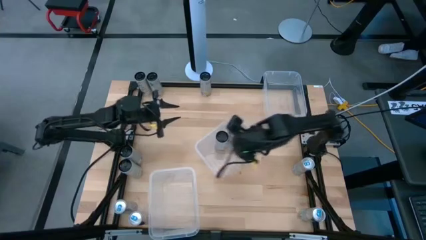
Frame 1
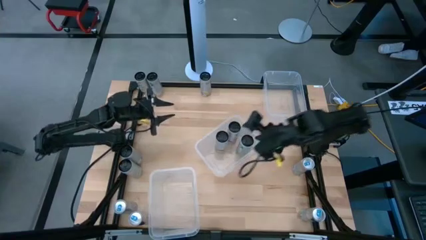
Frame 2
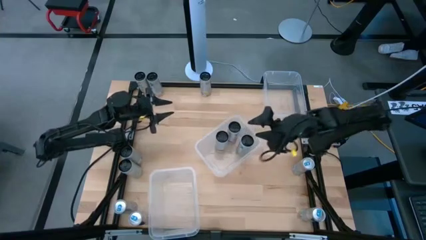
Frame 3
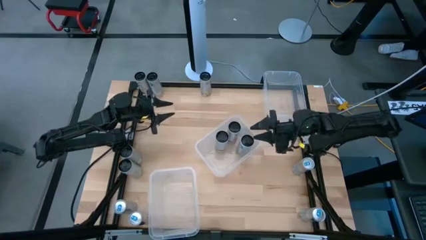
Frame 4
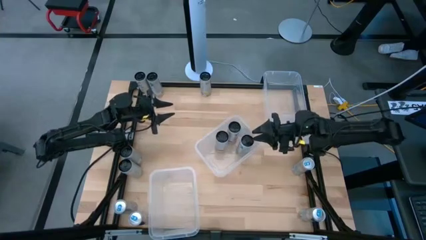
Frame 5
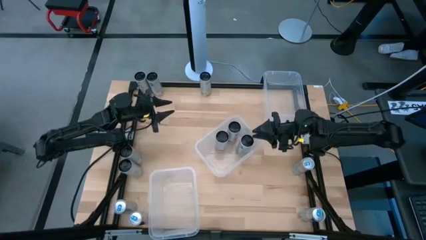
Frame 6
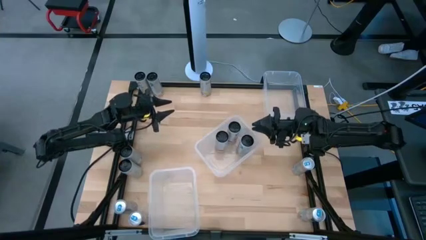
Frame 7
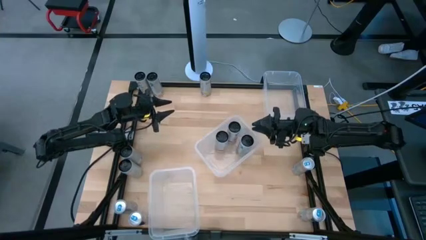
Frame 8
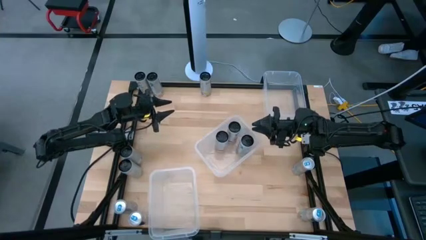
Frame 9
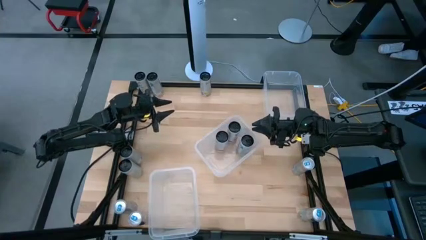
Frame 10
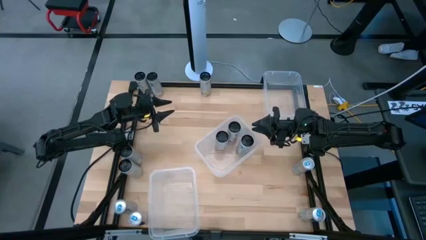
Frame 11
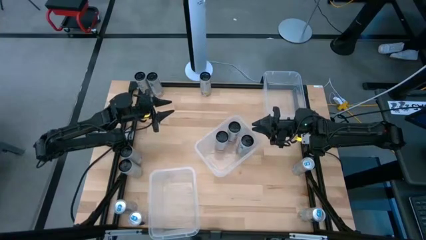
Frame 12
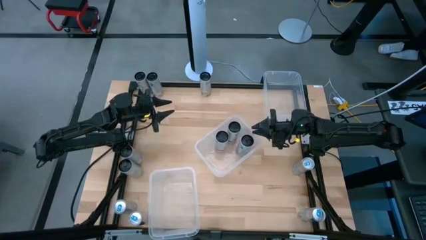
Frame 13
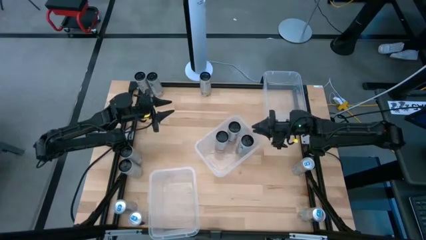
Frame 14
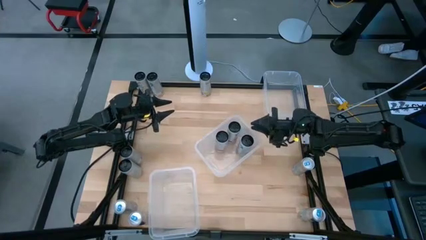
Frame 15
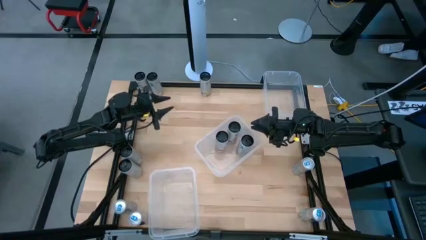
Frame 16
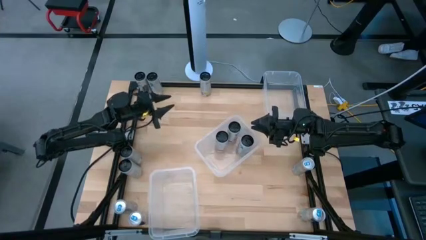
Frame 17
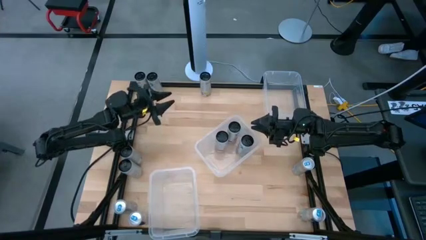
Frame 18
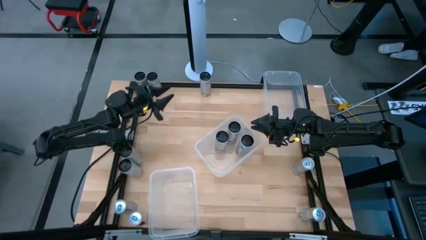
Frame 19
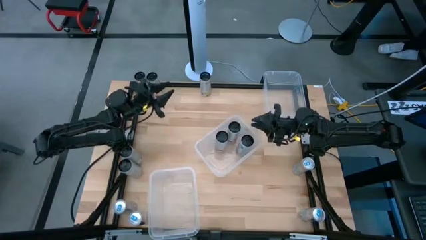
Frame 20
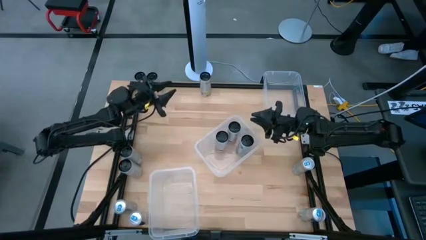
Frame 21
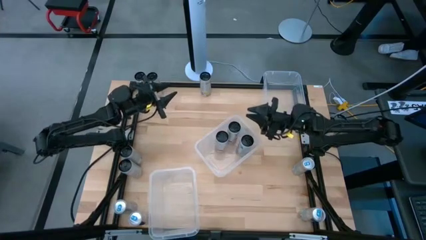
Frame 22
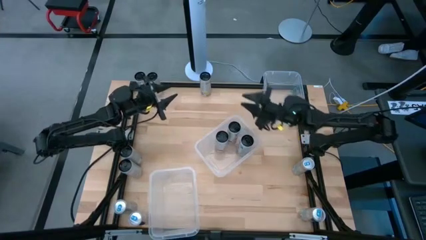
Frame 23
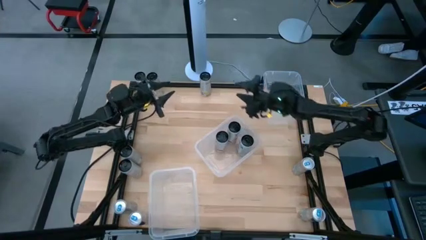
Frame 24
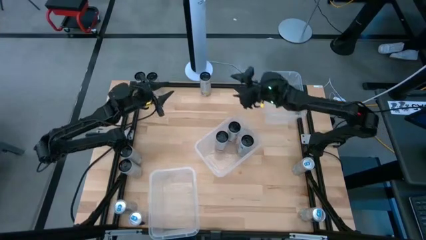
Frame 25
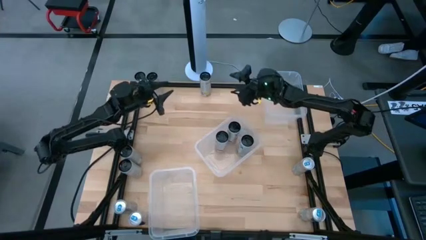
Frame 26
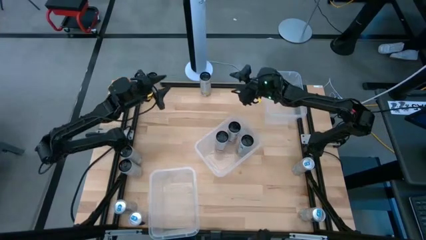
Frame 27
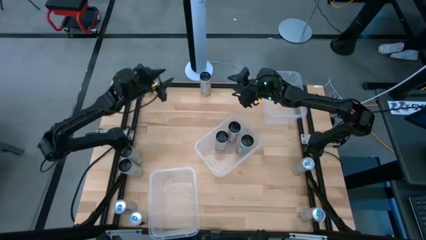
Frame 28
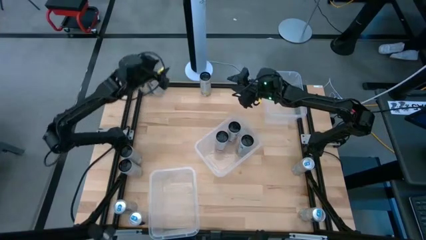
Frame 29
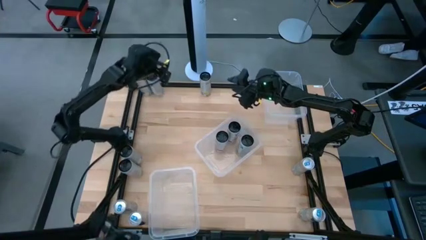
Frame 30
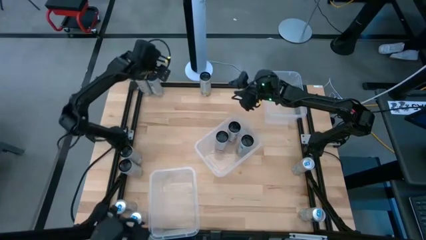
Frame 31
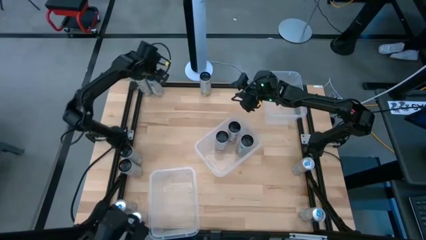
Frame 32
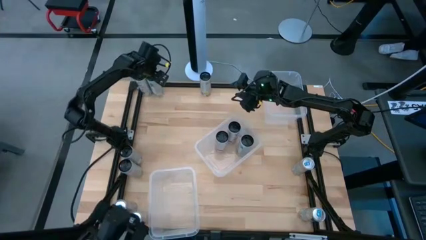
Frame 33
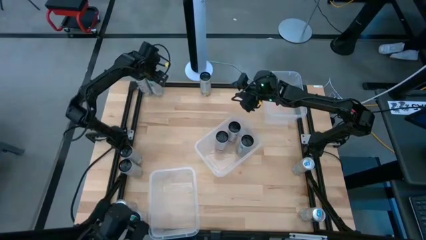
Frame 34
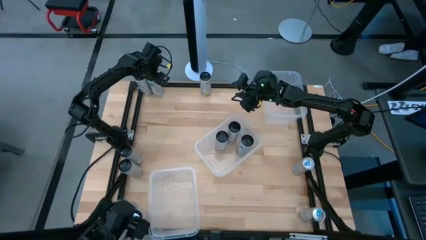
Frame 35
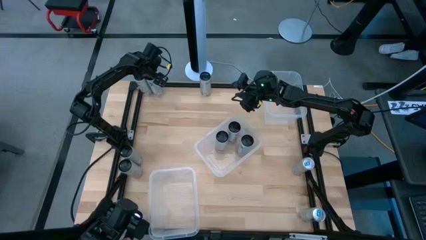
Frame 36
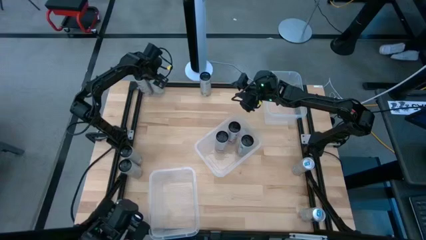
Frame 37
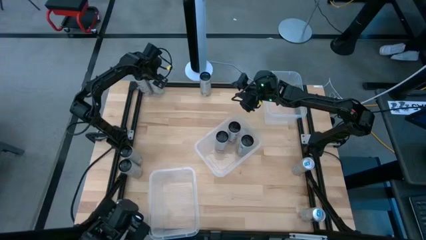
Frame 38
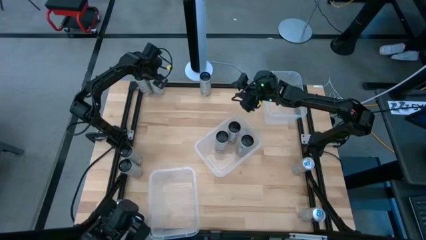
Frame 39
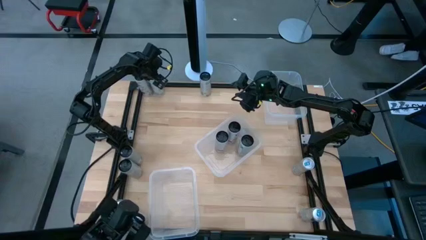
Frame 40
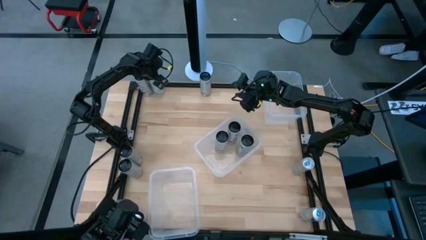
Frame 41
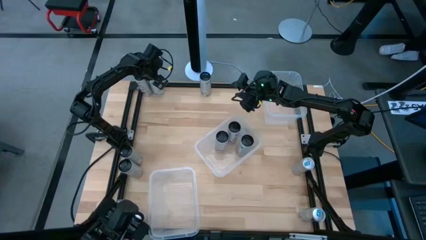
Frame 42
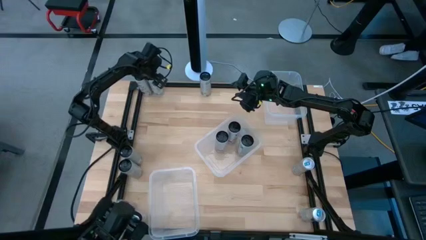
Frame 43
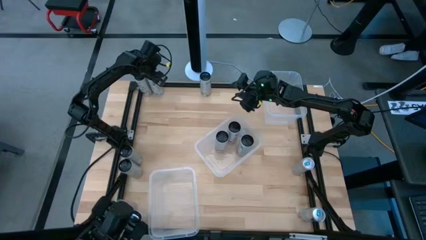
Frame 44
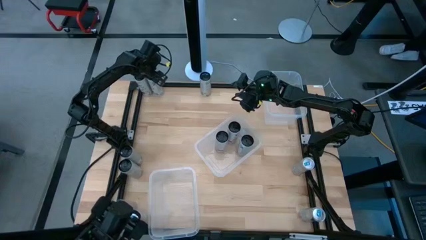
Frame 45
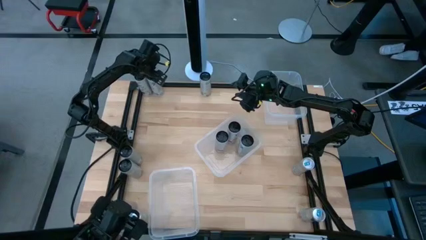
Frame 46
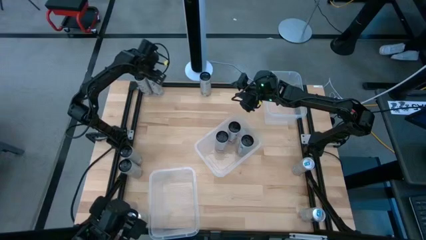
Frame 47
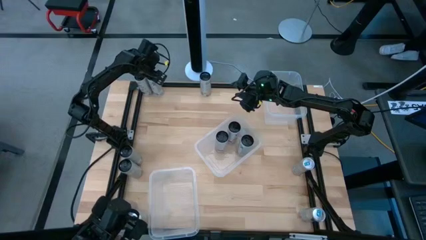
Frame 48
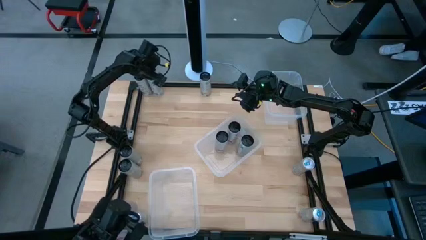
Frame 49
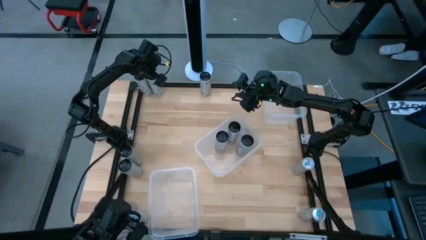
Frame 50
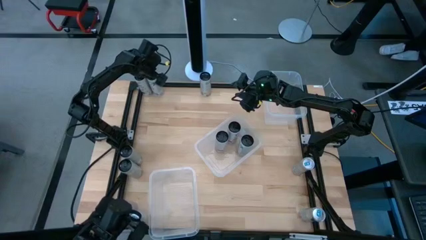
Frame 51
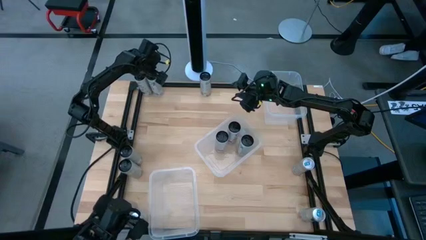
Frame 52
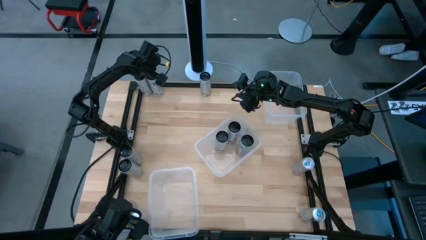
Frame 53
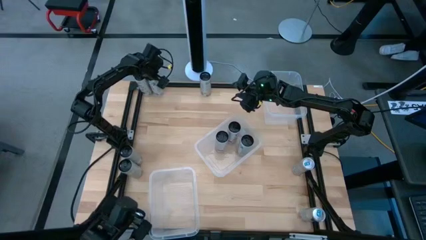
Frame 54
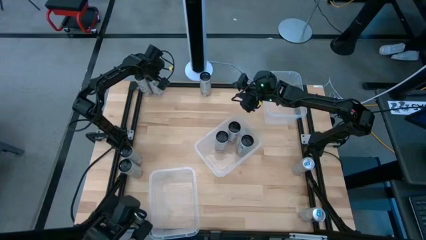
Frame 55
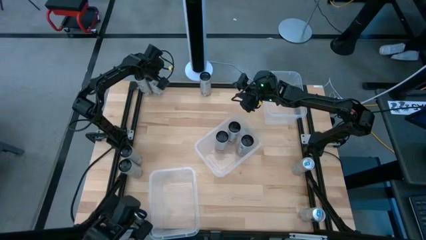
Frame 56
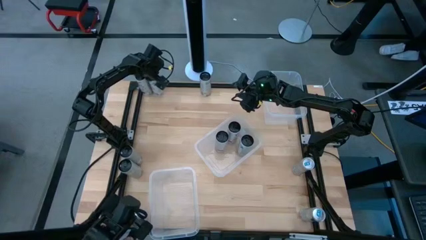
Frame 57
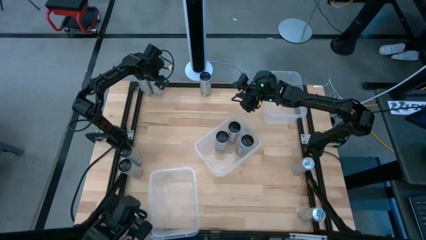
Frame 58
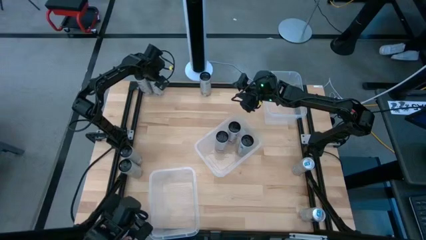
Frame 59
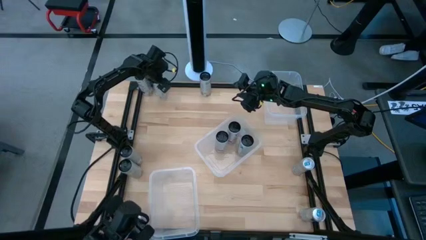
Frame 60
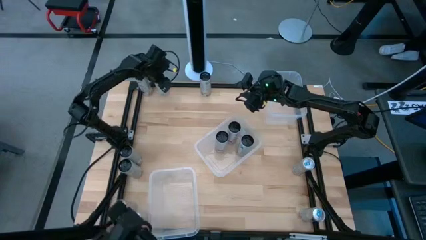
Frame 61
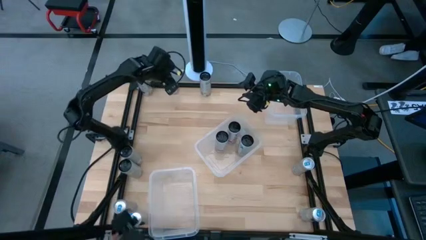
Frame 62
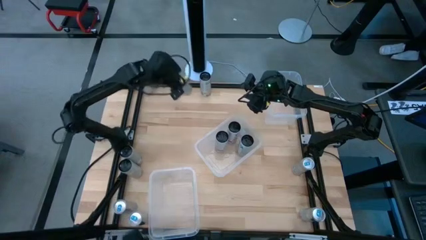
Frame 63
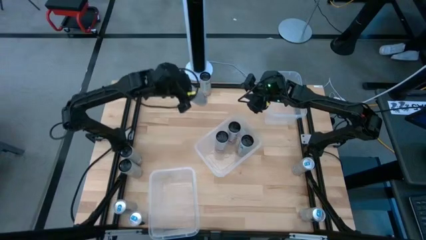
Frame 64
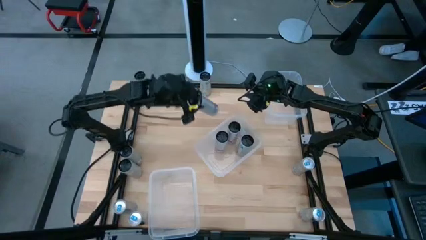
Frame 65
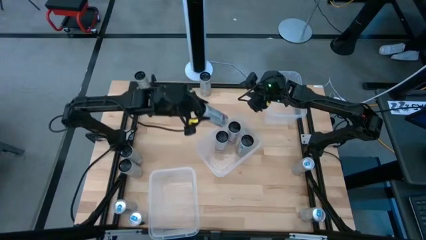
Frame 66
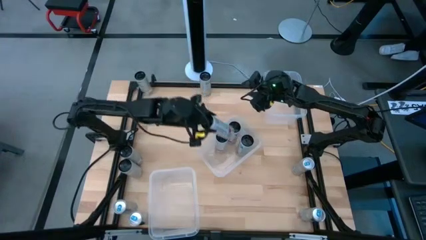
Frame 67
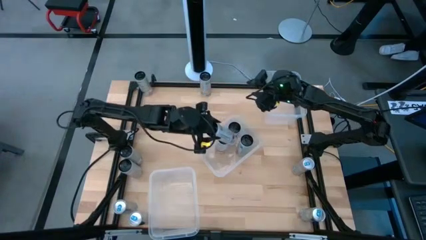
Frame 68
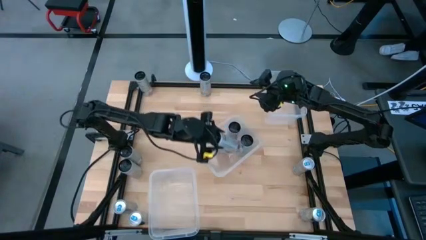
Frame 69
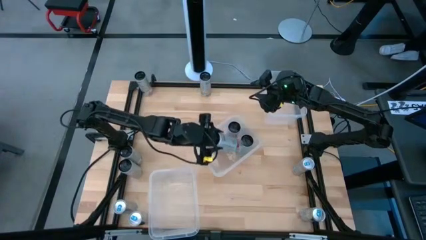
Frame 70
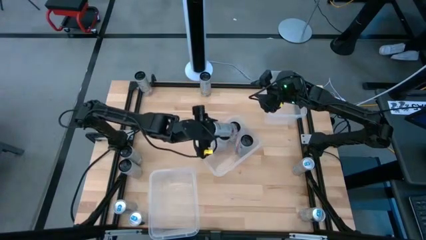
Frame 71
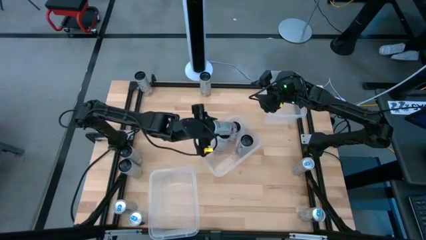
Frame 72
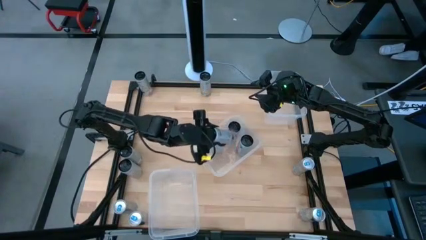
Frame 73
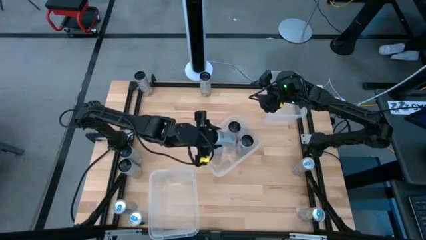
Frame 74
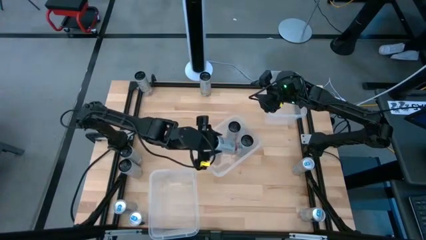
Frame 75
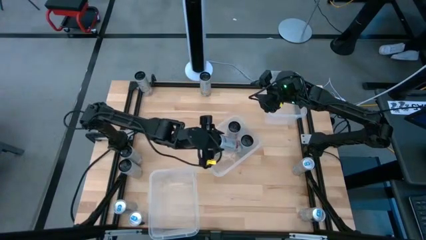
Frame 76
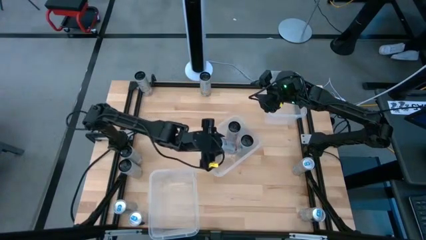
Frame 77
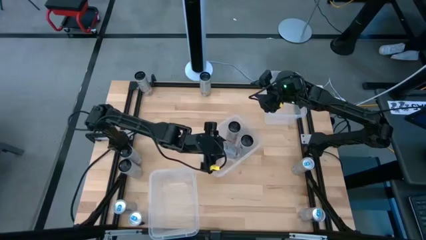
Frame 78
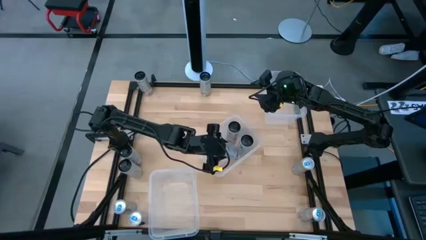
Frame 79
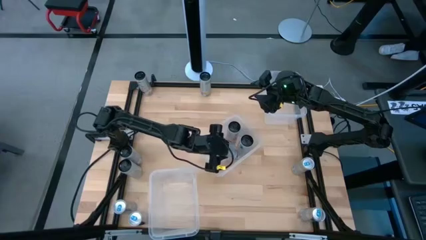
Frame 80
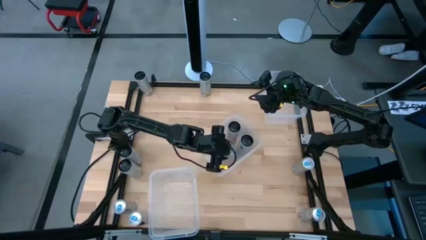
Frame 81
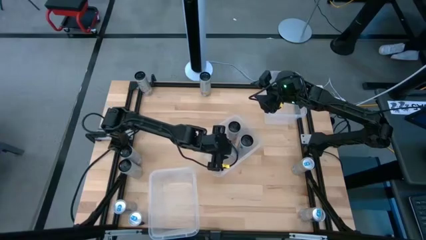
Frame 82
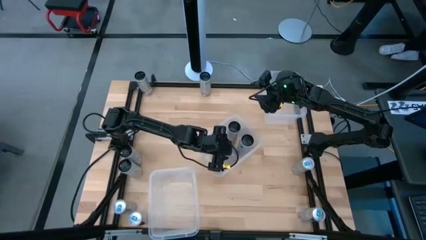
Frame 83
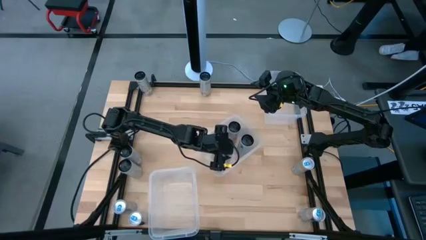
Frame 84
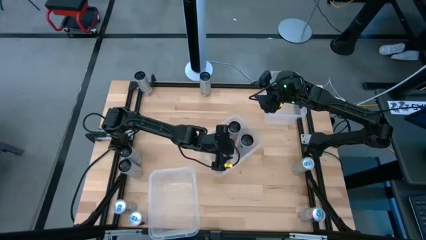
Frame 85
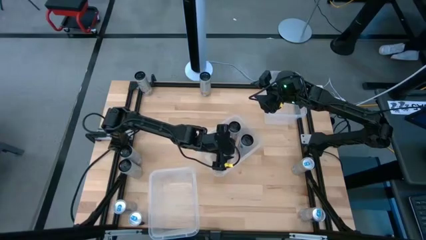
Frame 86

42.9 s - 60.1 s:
Task: Sort soda cans
Put the white and black peach soda can into the middle transparent bin
